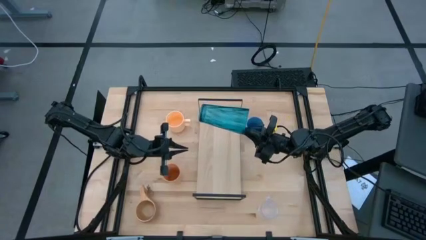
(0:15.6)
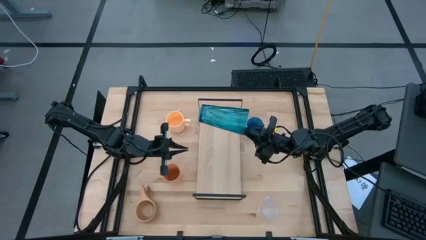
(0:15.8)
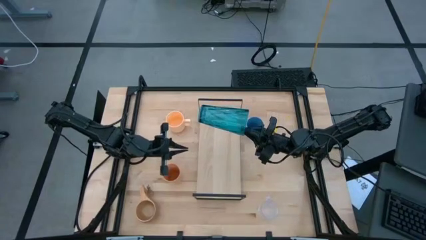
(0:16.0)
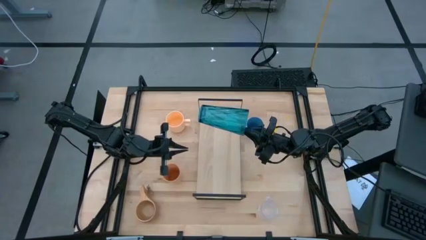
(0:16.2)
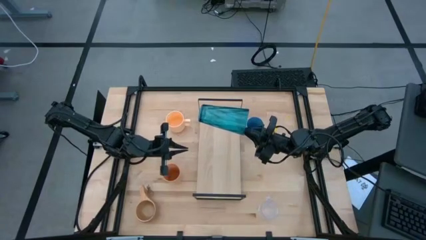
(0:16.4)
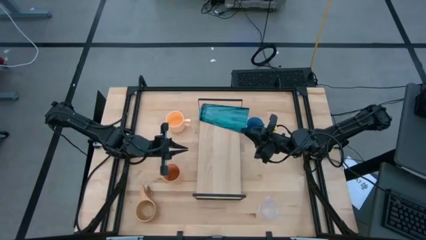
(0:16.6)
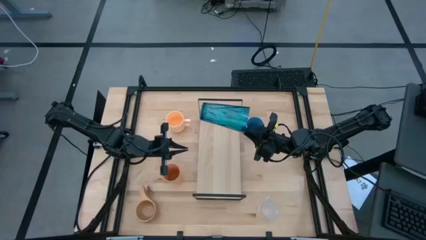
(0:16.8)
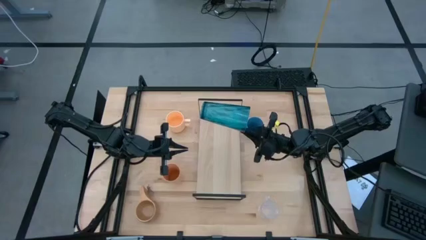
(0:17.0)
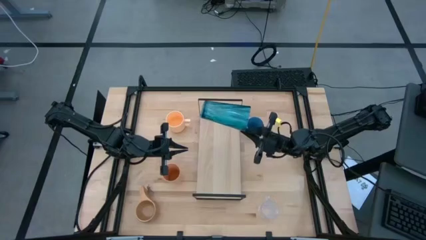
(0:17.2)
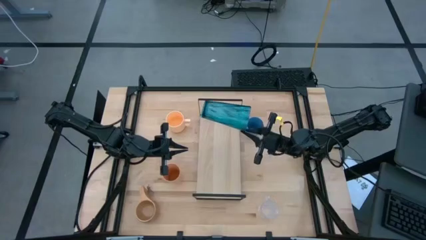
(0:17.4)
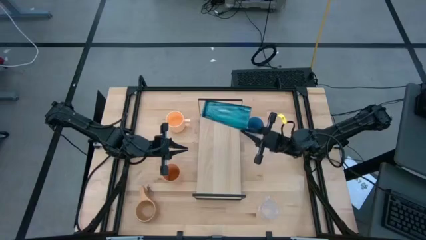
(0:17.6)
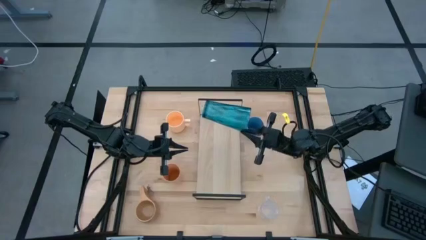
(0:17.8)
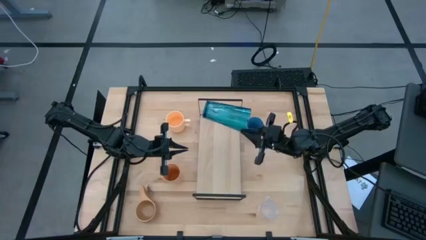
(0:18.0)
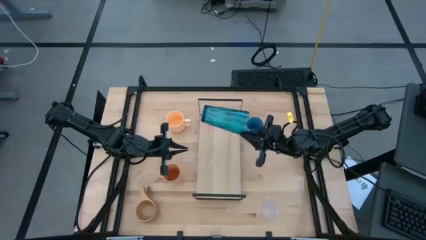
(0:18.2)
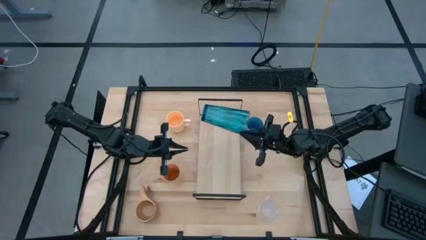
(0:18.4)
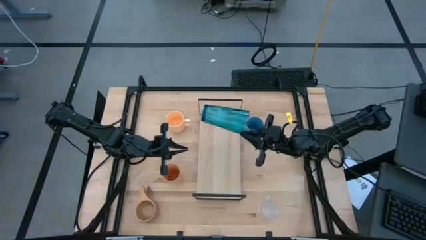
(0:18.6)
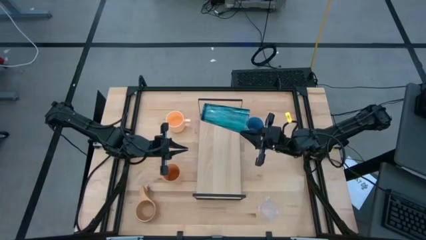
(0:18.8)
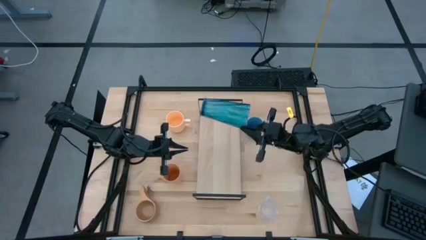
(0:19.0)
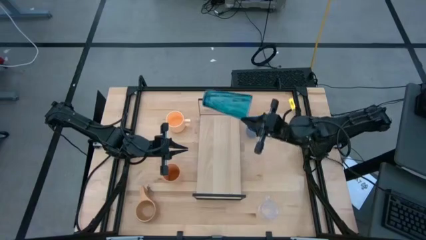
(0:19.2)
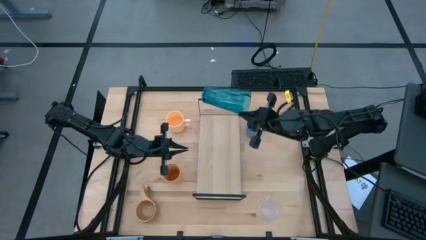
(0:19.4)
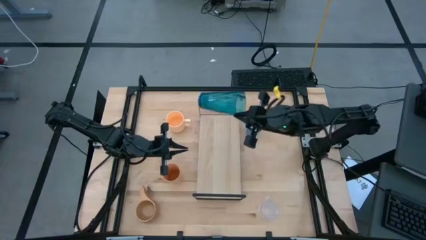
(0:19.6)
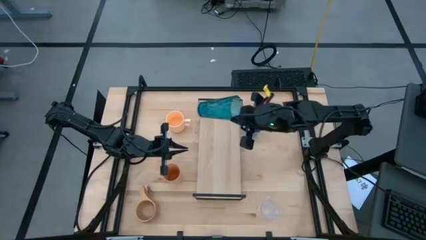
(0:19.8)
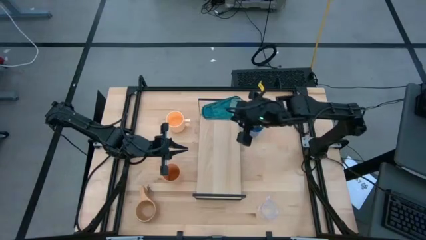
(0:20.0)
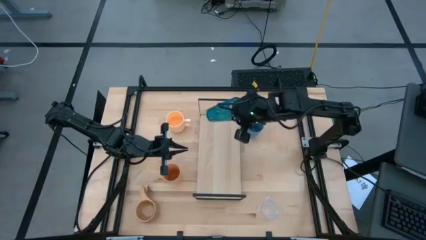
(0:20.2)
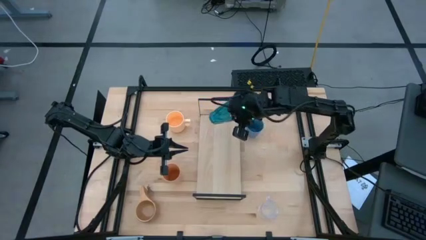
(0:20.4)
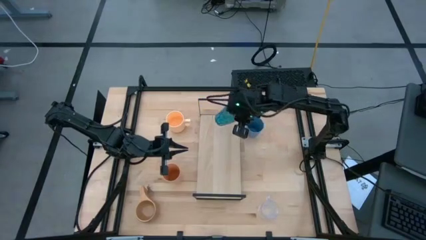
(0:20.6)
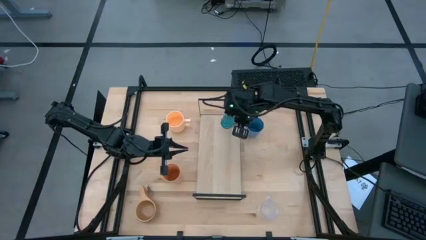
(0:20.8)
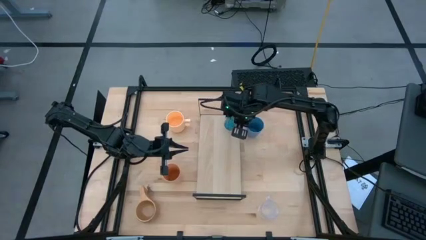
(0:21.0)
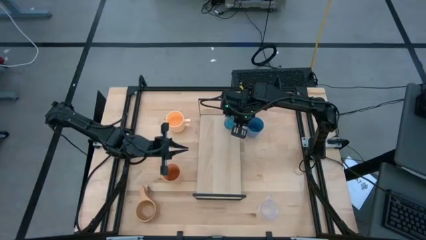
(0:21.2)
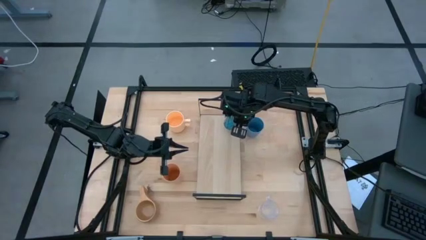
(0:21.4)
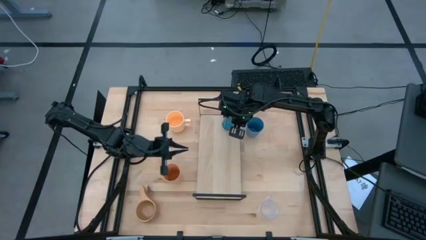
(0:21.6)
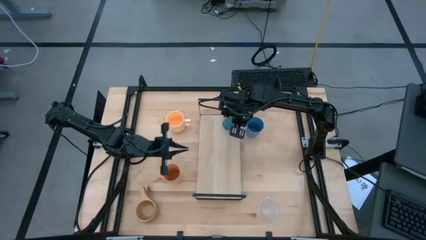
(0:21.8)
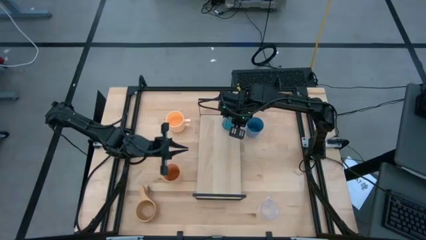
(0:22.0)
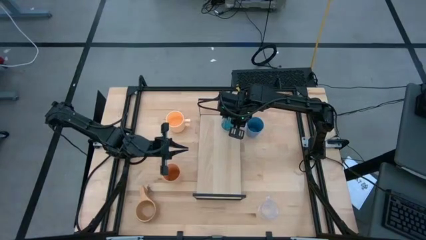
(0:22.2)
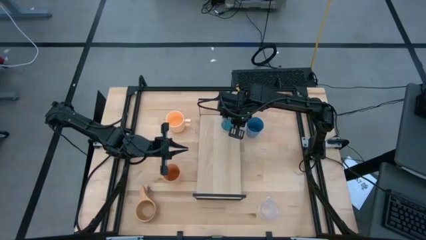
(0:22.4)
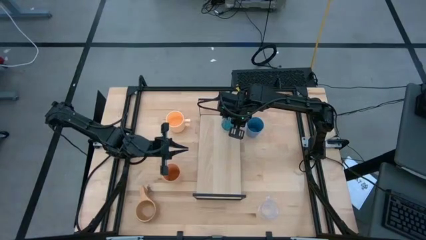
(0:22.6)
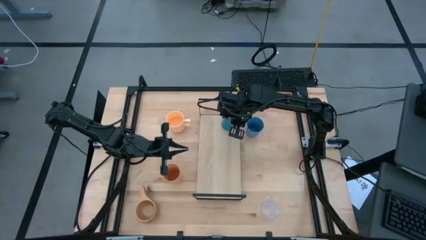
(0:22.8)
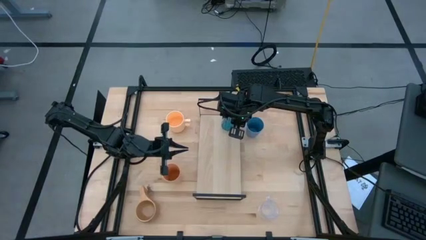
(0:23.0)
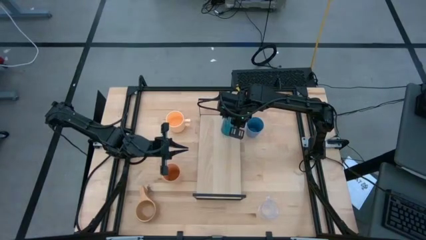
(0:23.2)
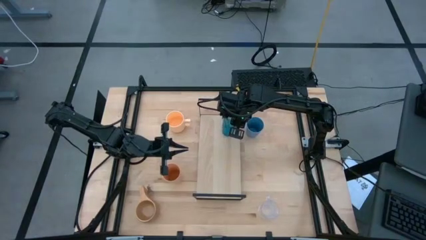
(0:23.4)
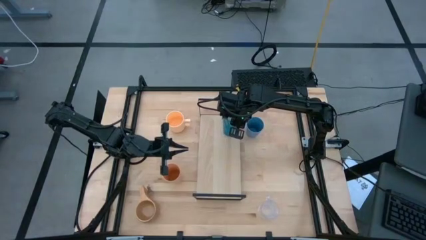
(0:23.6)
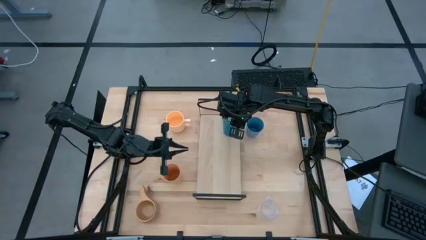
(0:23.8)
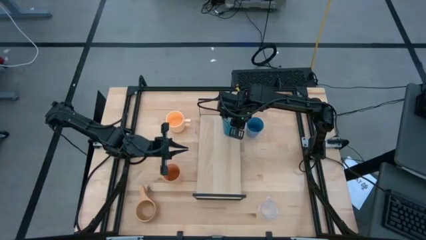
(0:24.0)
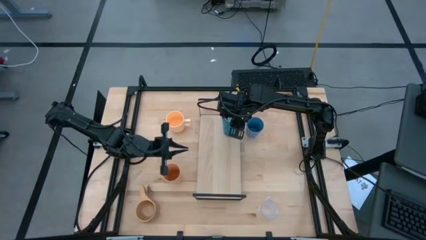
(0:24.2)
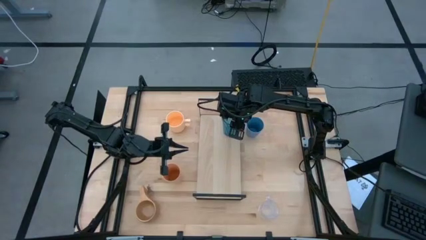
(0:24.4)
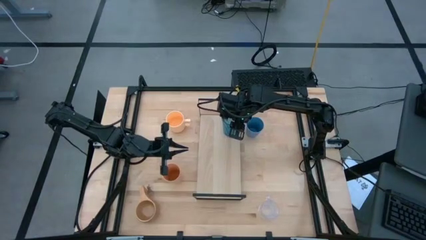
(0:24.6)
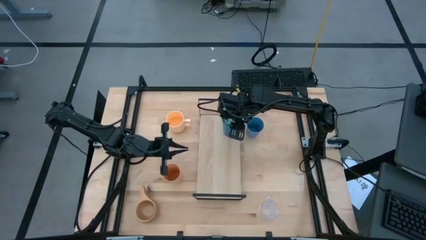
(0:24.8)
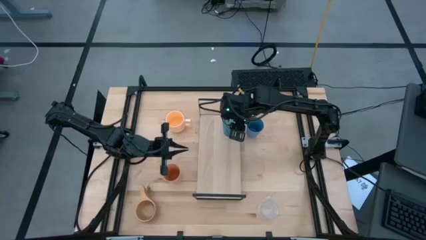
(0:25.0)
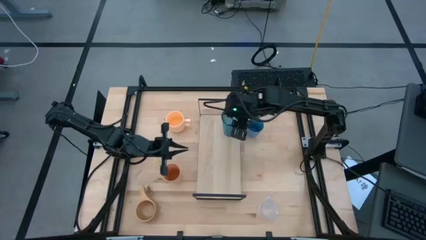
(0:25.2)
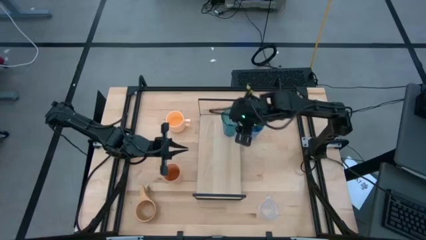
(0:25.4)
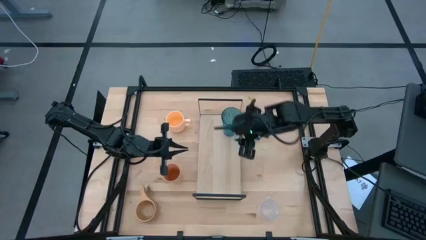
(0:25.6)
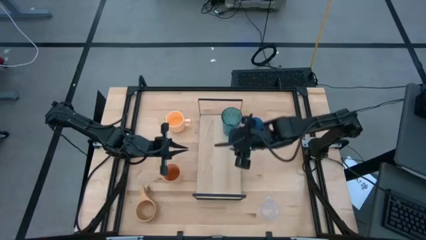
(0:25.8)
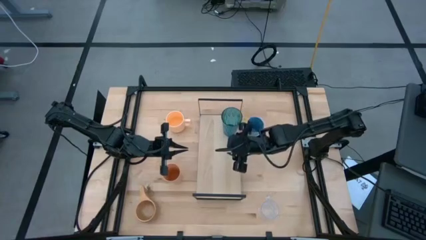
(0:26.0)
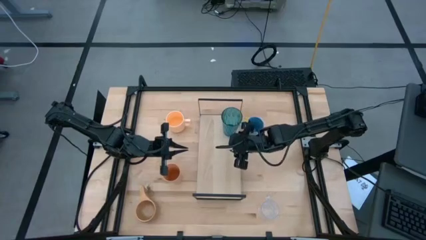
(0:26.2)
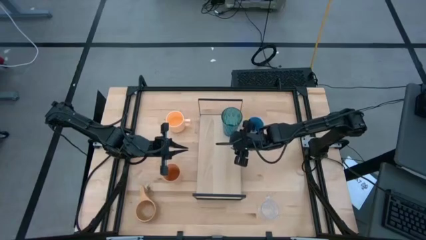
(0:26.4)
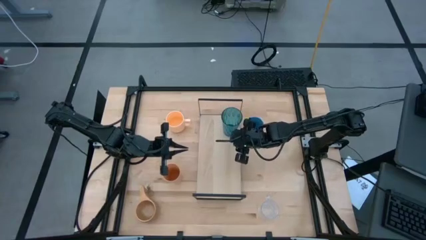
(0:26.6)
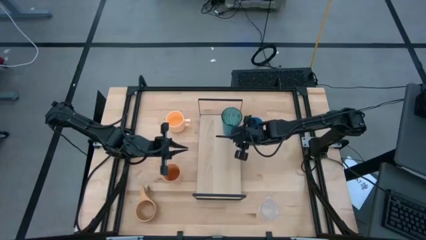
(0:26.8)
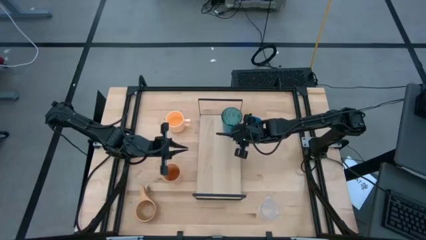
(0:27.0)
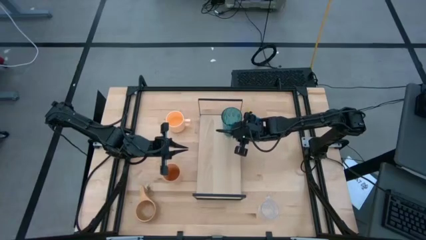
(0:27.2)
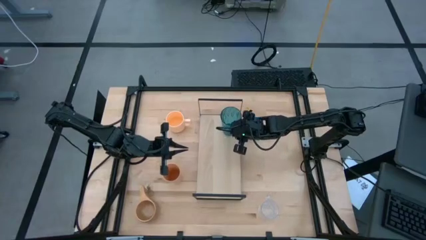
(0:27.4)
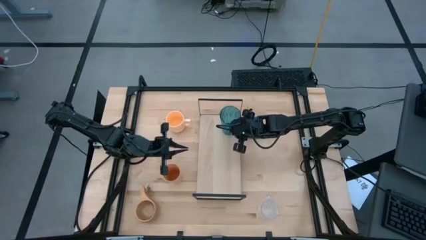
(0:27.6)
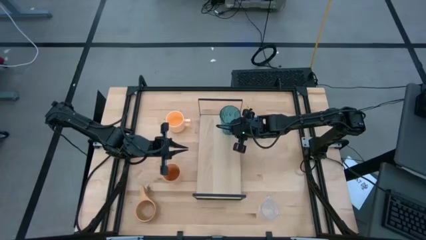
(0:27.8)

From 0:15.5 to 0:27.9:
Task: Stack small to large cups/mugs on shelf
Put the light blue cup on the shelf
